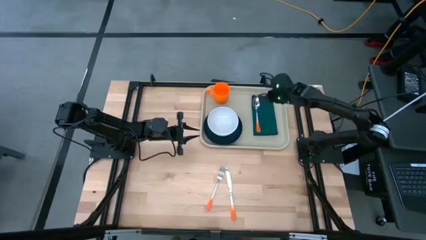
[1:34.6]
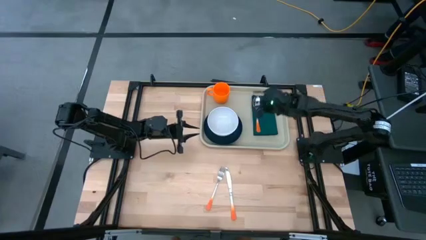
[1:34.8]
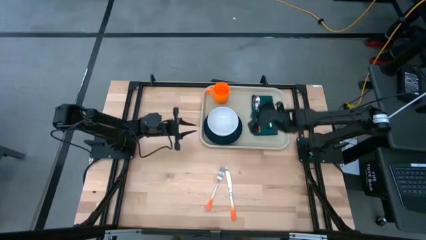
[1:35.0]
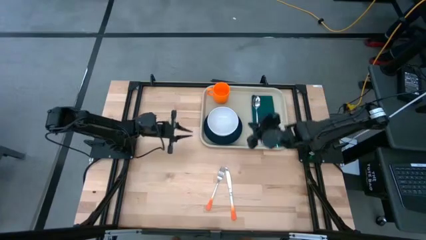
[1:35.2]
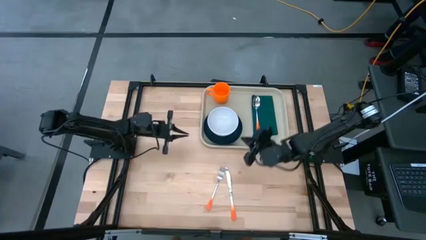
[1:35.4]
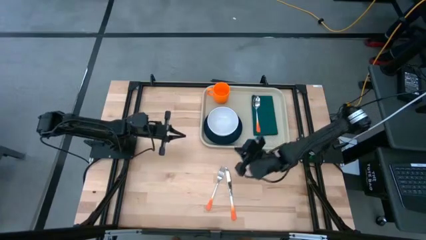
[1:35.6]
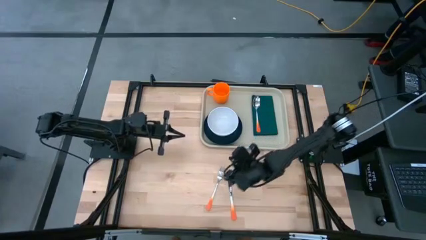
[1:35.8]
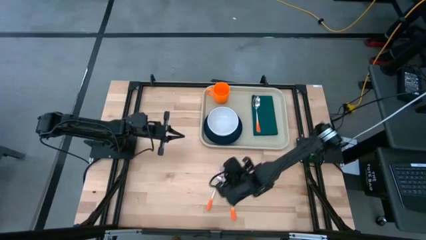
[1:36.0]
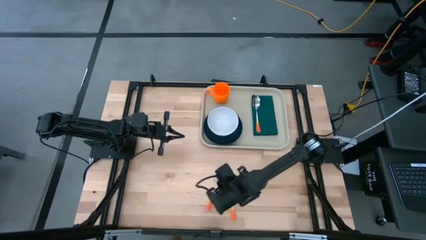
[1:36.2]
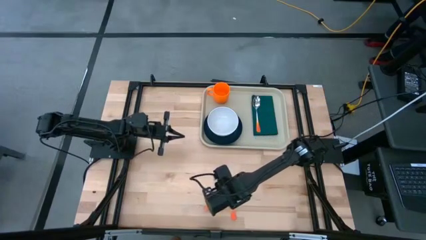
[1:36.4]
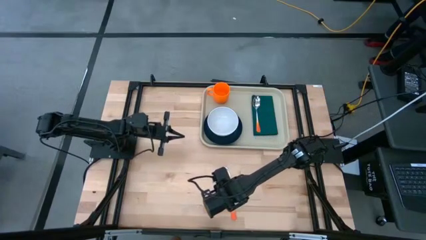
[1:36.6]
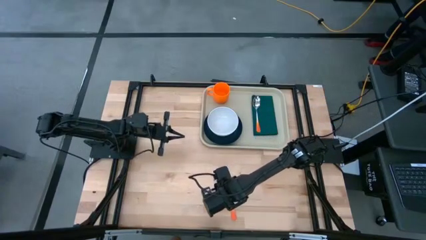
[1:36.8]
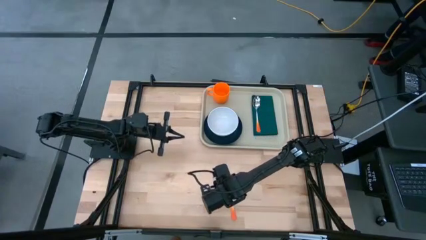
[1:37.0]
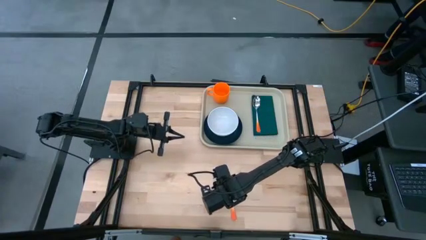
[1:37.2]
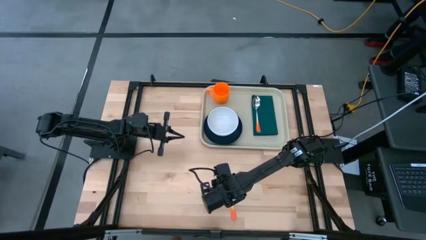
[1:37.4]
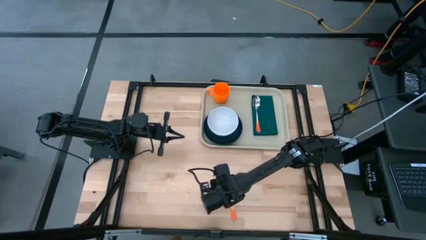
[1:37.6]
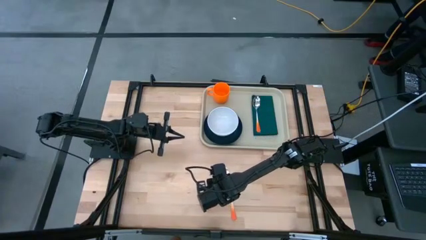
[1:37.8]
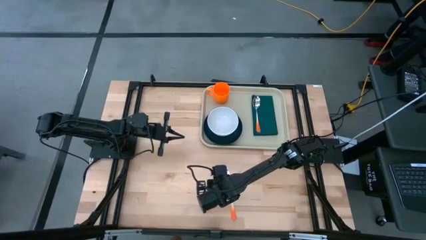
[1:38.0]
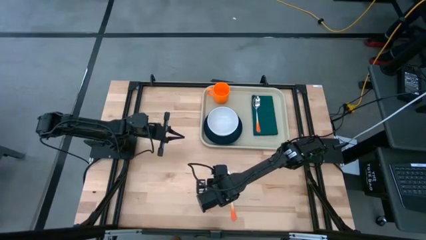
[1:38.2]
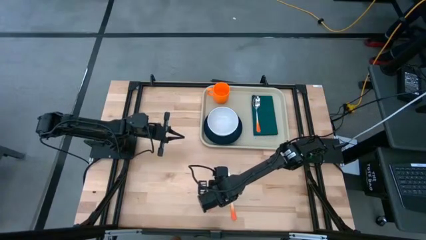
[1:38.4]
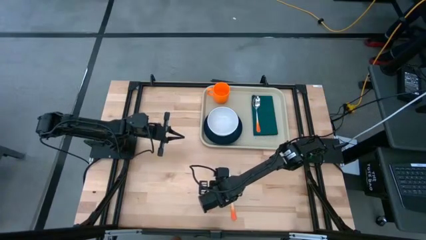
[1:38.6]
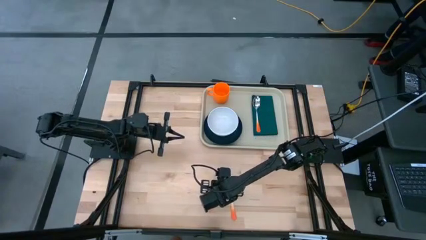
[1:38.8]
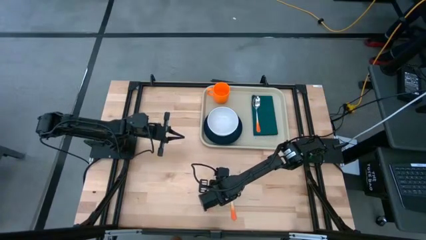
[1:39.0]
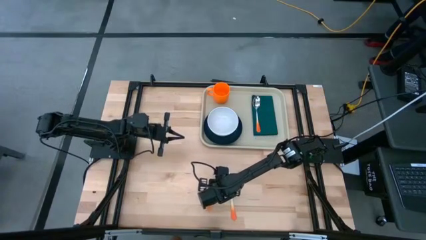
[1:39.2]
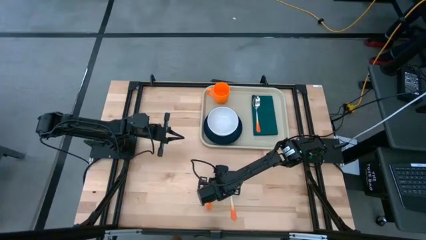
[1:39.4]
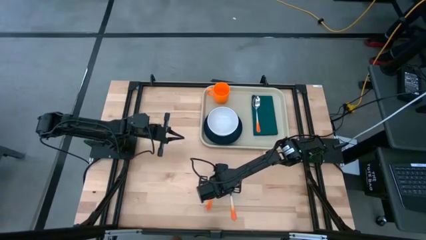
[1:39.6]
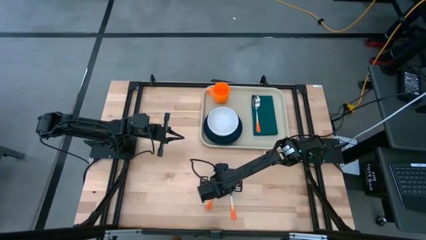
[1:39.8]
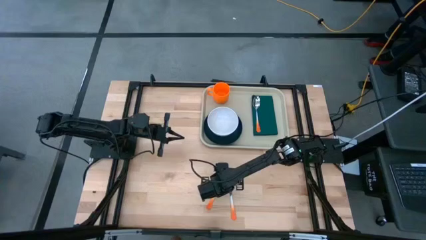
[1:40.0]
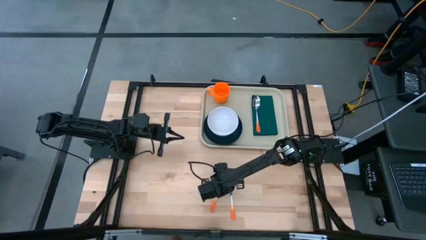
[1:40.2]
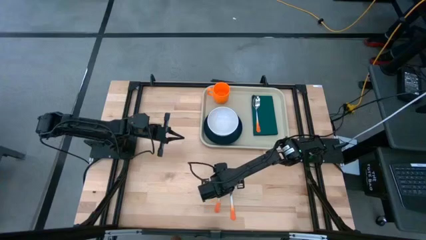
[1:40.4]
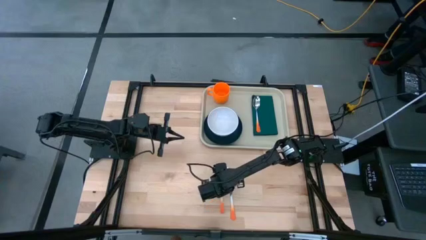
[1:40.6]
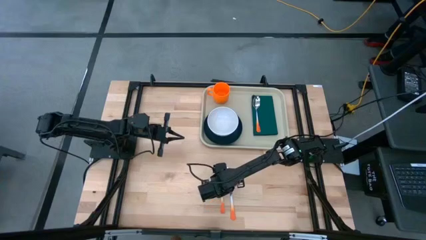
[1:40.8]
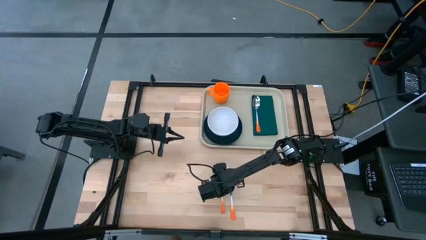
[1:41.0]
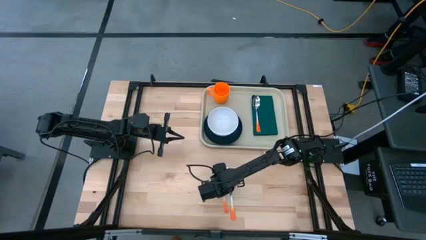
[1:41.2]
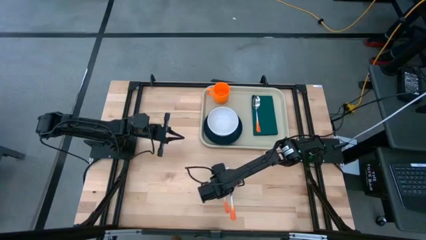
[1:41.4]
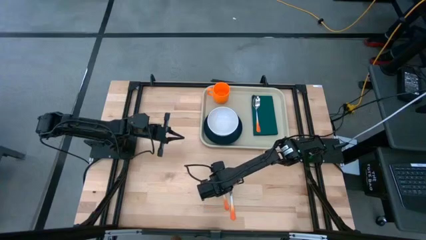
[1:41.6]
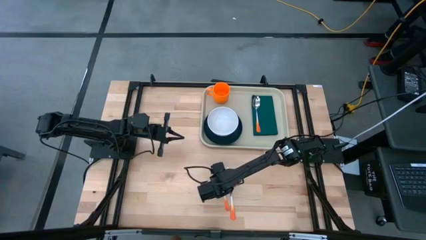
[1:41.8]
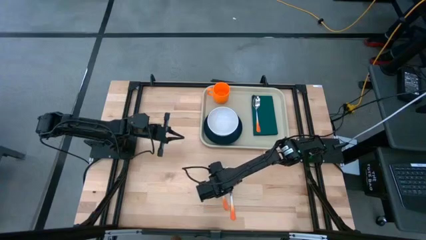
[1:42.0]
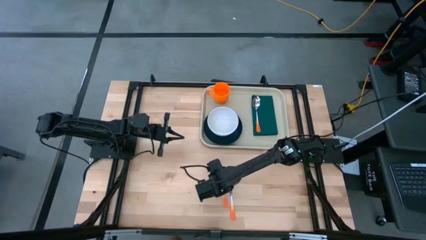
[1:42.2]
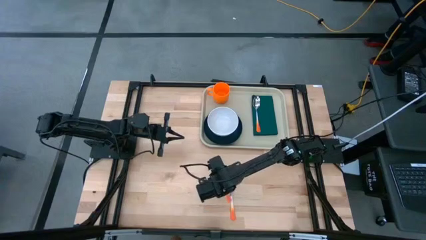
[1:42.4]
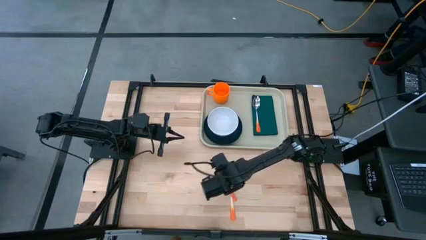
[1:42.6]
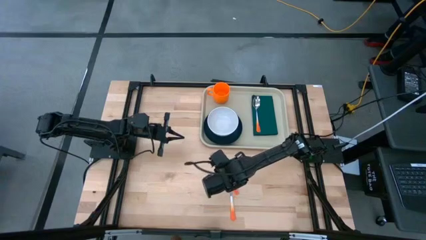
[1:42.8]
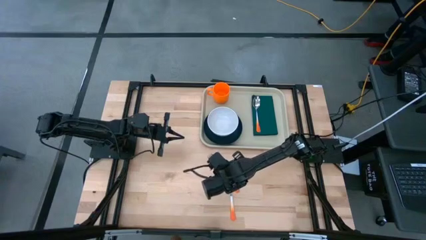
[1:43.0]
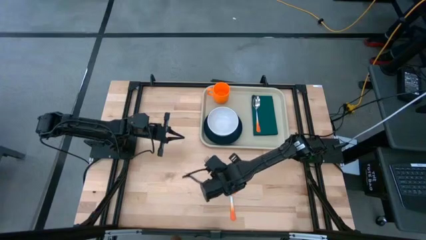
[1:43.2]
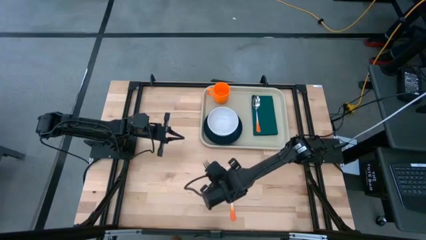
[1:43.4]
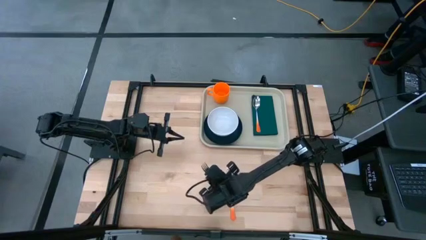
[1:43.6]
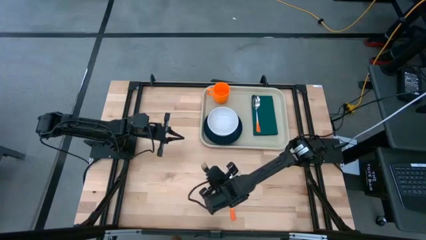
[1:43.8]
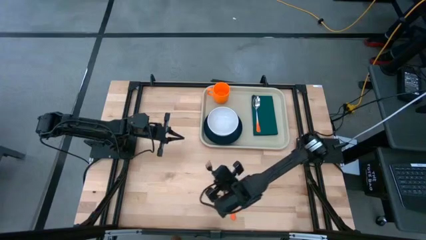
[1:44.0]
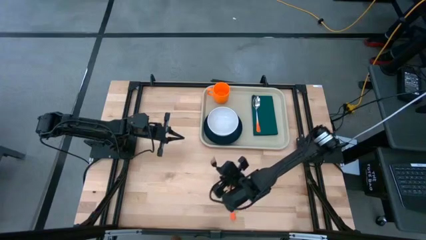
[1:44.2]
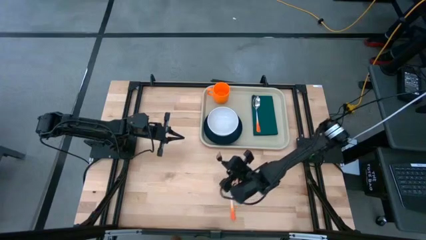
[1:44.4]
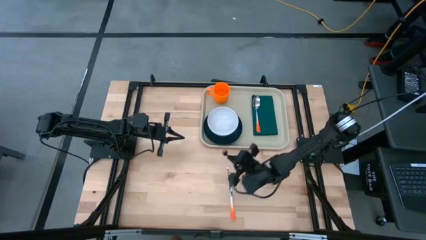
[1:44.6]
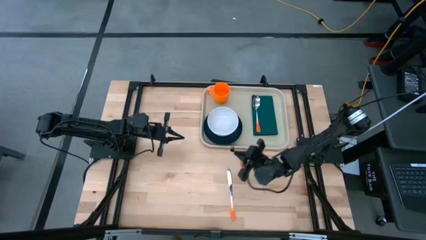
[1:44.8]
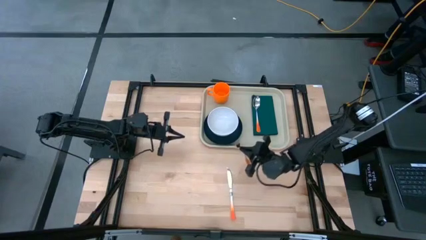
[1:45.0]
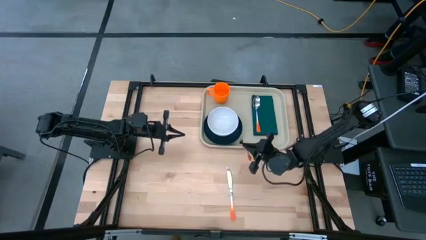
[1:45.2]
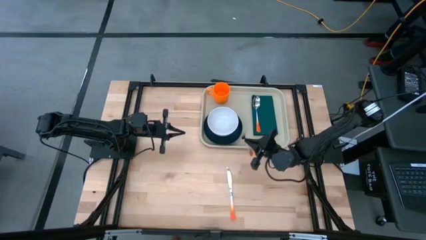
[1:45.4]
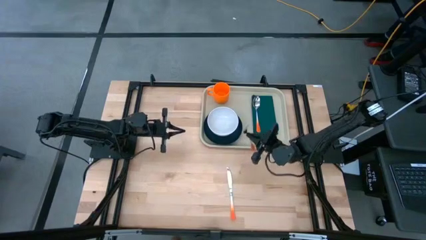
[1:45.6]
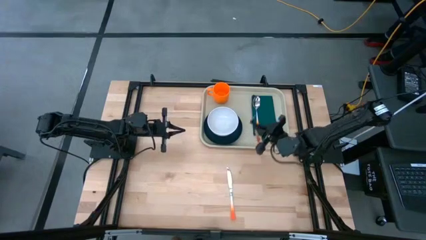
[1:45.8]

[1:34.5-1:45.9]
Task: Set up tray
Put the orange fork to the right of the orange spoon on the serving tray

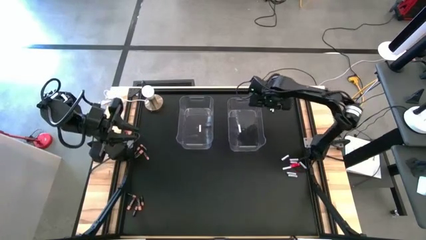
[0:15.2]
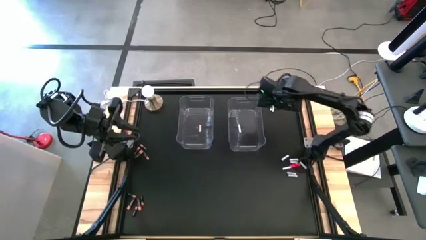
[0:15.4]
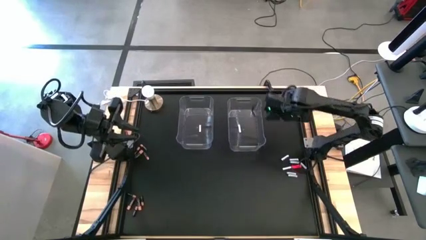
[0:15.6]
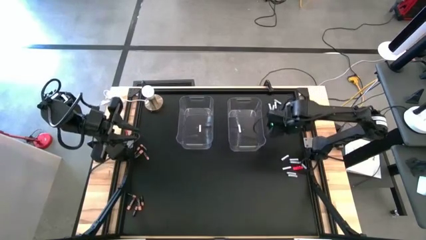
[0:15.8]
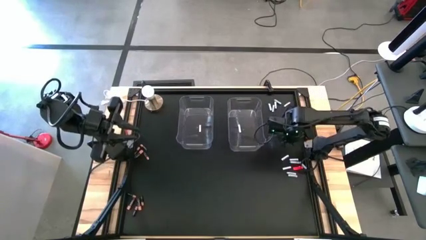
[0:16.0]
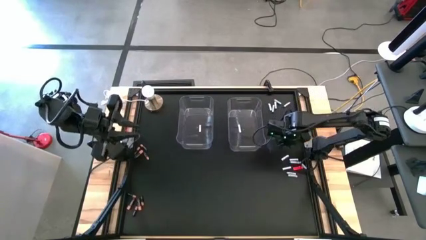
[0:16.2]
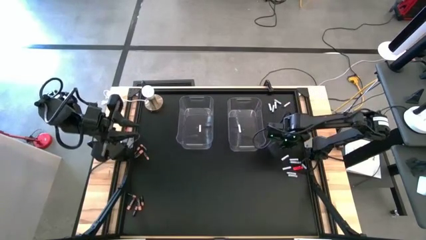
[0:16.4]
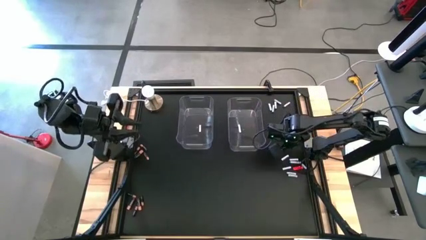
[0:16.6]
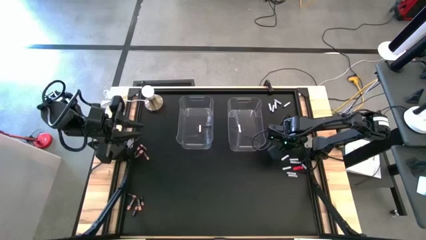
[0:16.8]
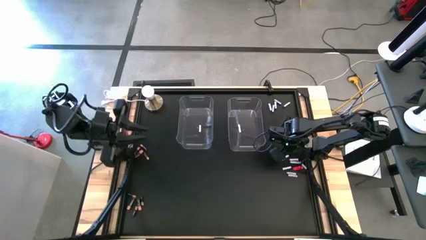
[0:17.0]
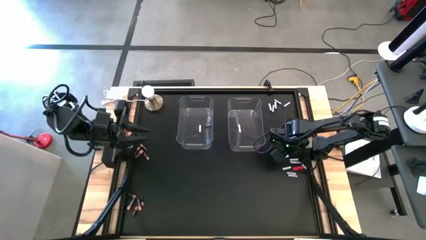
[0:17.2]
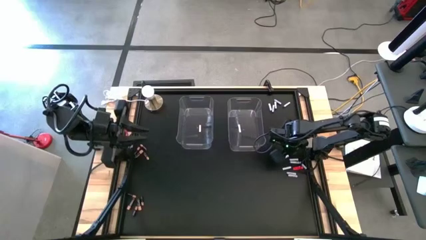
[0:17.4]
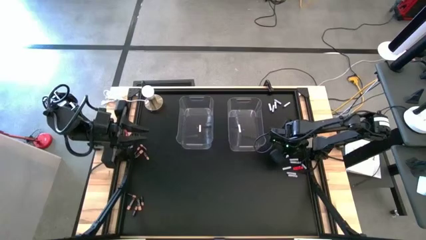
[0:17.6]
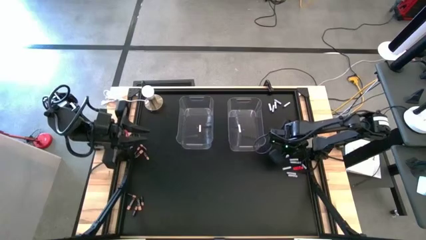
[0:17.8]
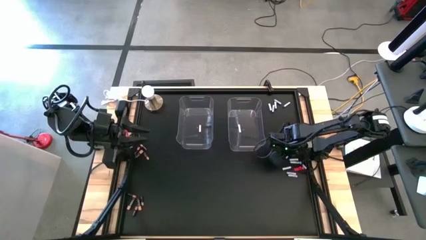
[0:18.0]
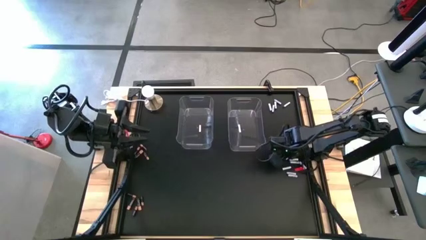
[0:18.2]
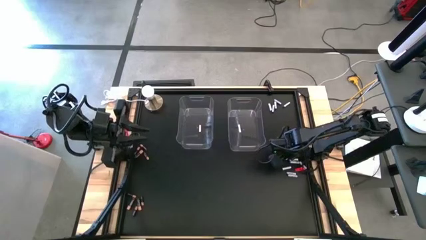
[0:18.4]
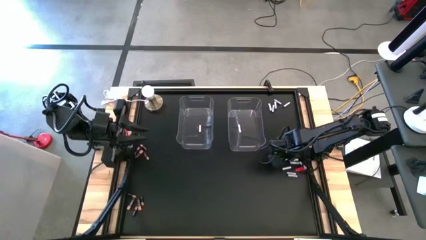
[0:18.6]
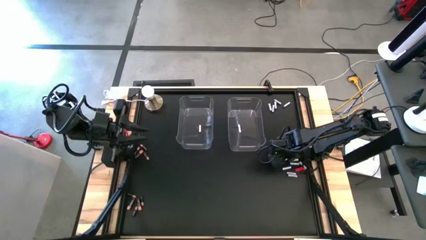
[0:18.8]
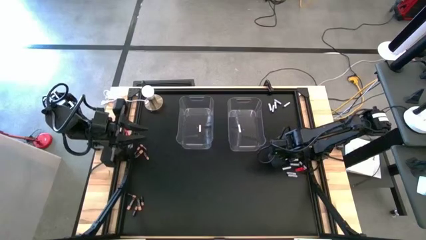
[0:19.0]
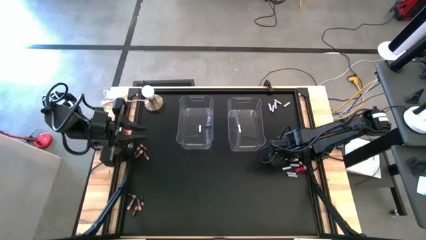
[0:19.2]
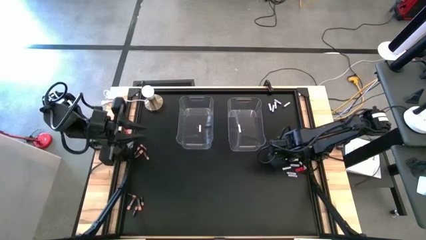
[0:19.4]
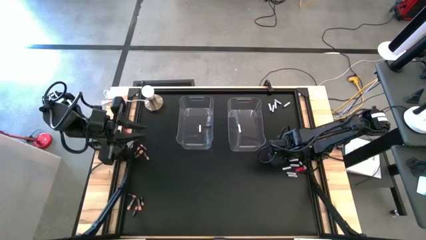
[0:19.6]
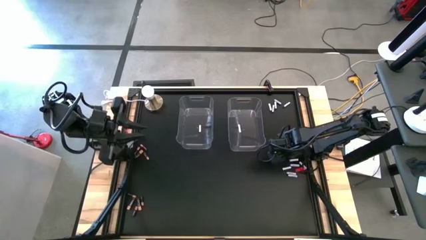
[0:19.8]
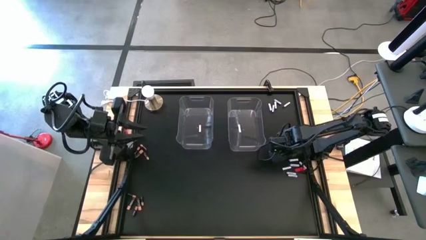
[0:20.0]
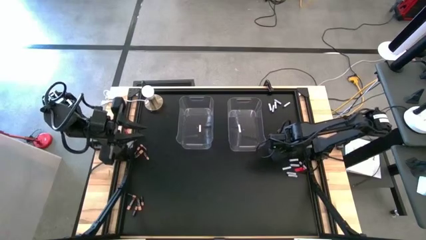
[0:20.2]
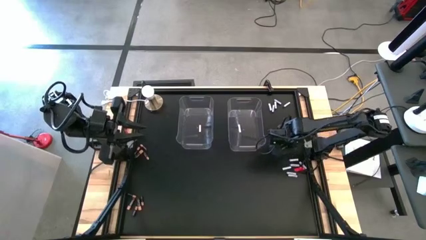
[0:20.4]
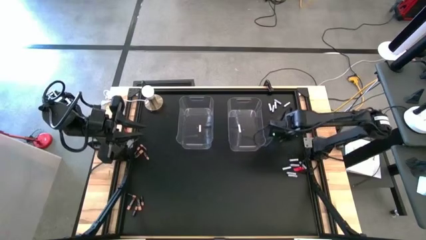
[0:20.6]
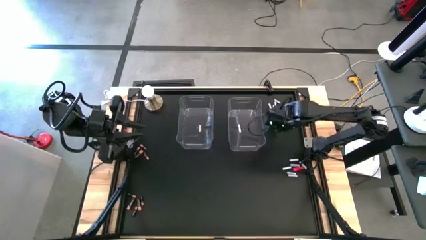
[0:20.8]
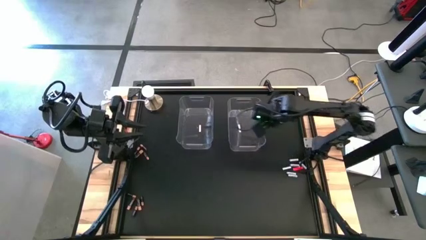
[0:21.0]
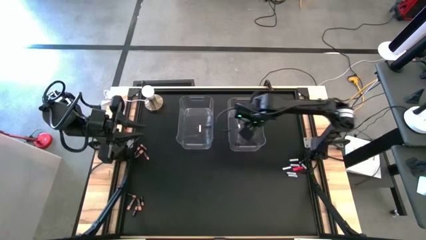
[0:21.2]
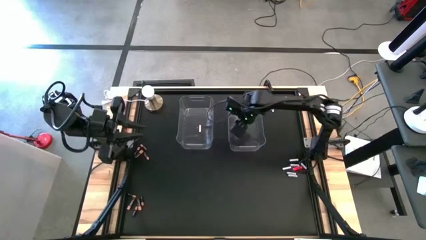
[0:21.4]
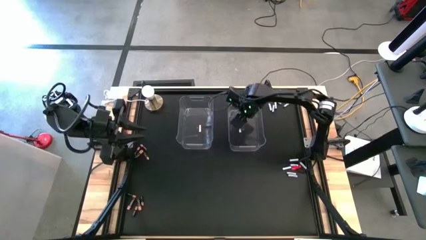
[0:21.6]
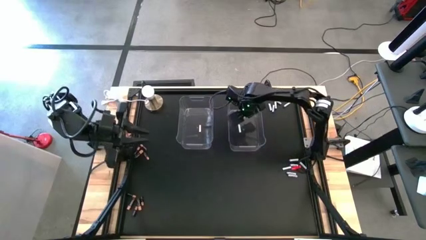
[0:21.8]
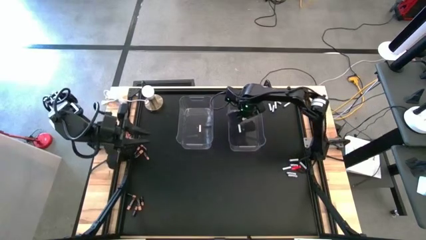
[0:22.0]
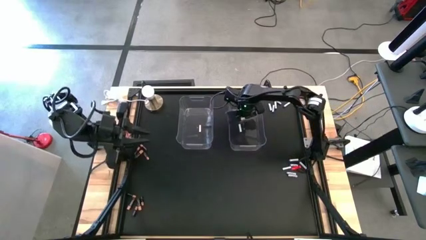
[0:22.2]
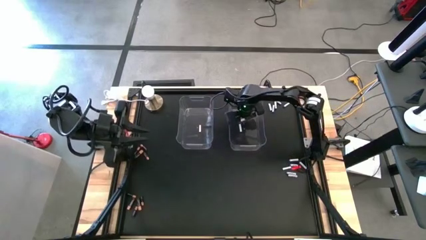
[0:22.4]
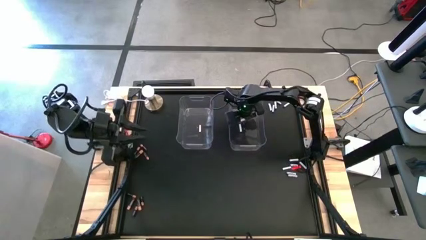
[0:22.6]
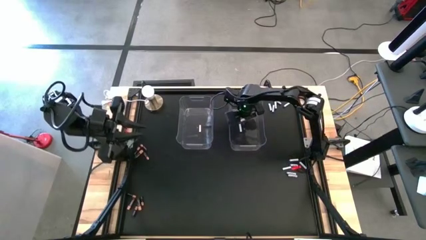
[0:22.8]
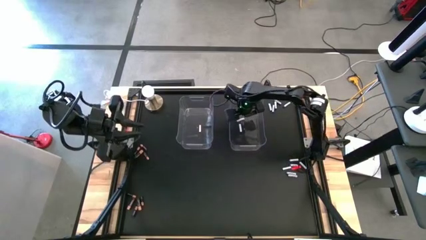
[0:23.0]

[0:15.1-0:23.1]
Task: Sort batteries
Put the white battery into the right transparent bin
